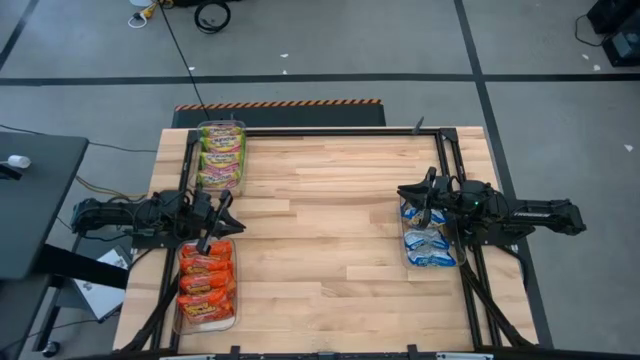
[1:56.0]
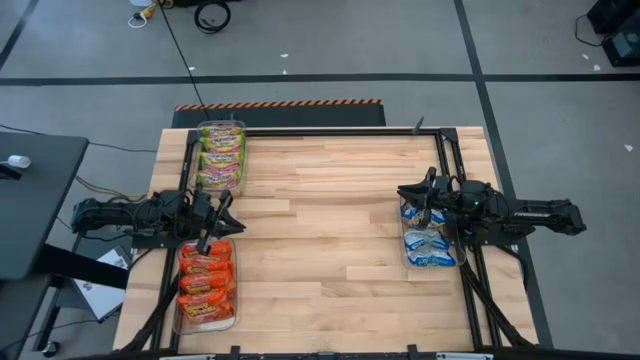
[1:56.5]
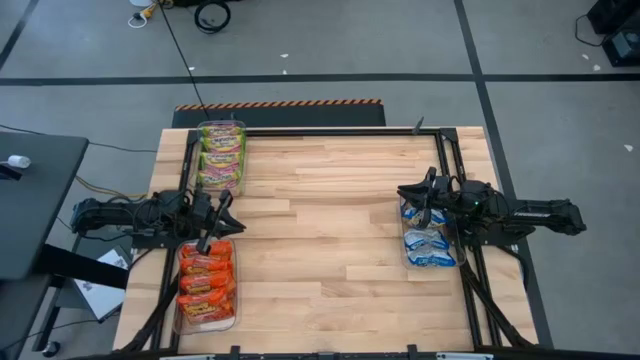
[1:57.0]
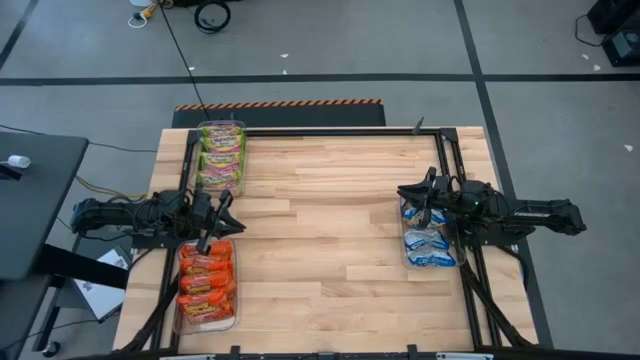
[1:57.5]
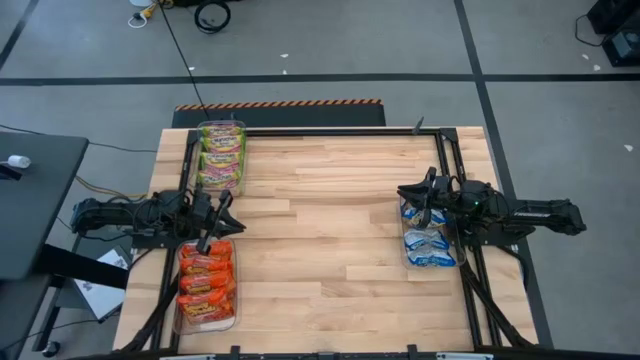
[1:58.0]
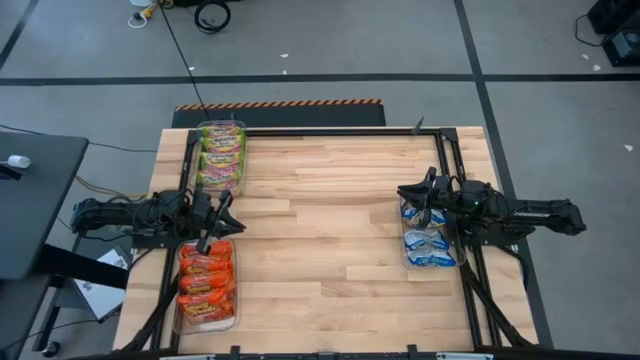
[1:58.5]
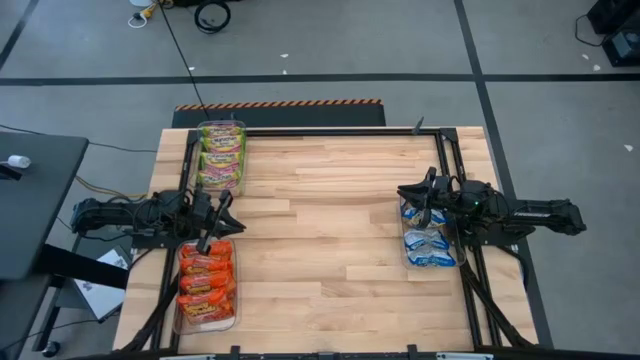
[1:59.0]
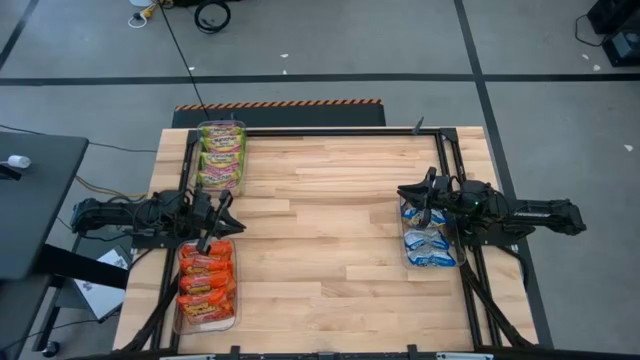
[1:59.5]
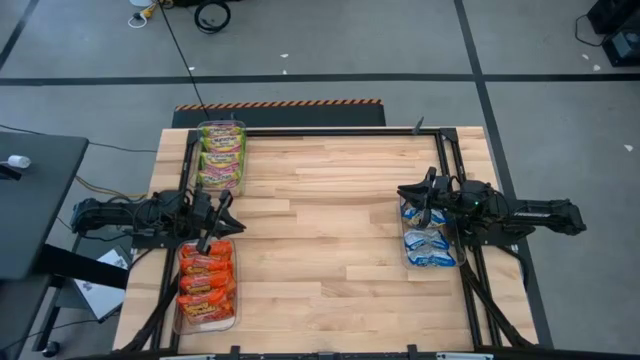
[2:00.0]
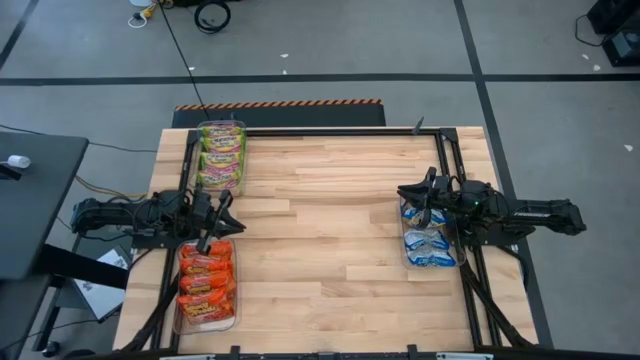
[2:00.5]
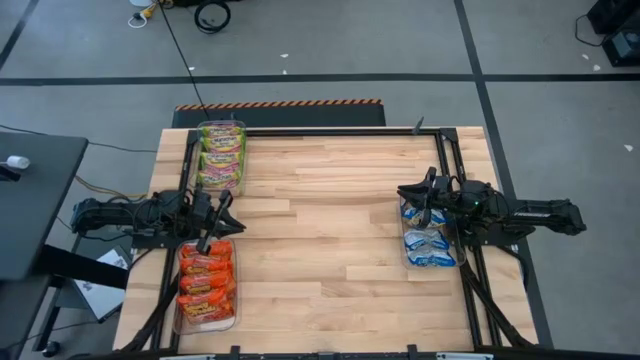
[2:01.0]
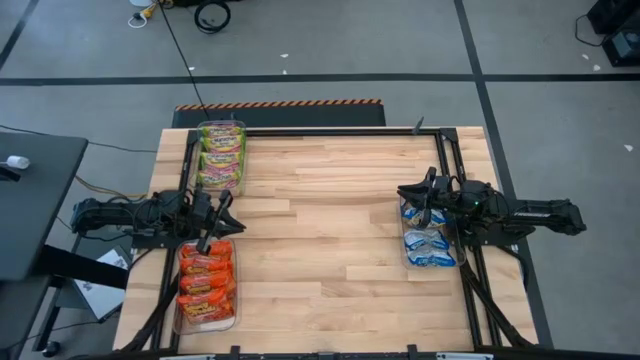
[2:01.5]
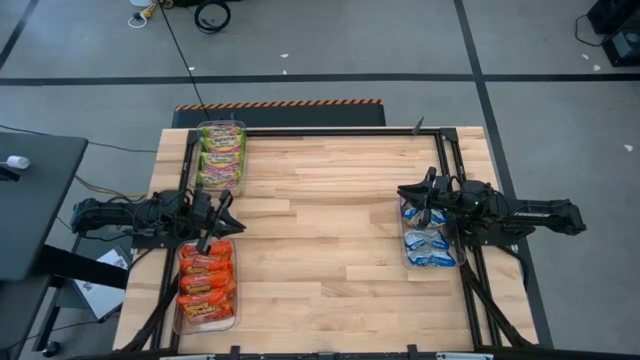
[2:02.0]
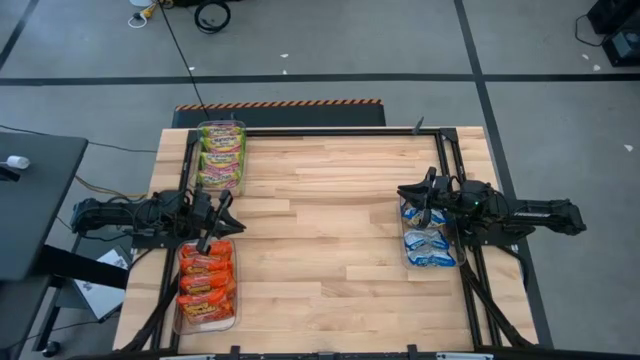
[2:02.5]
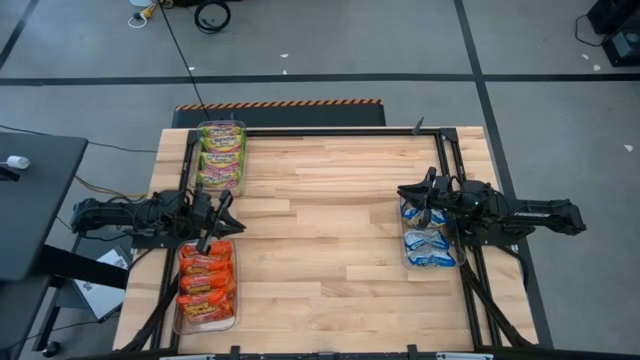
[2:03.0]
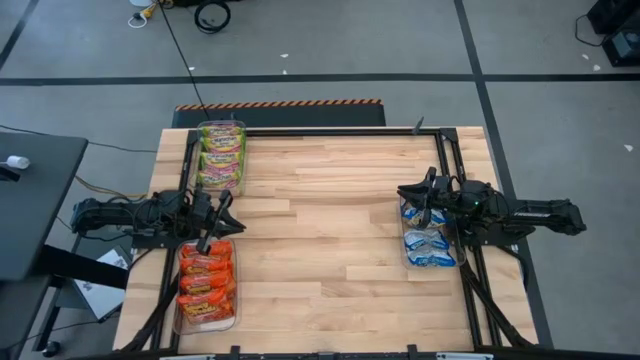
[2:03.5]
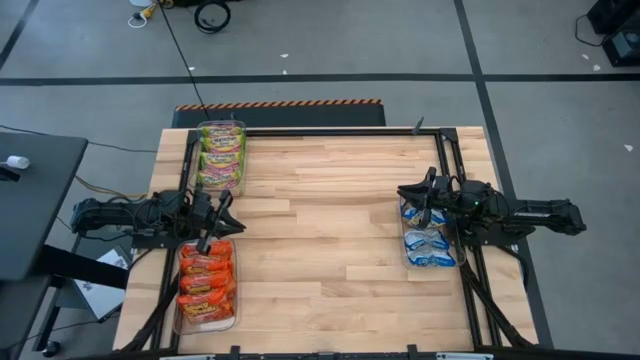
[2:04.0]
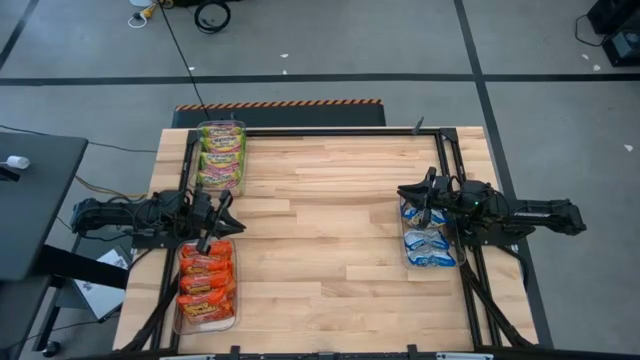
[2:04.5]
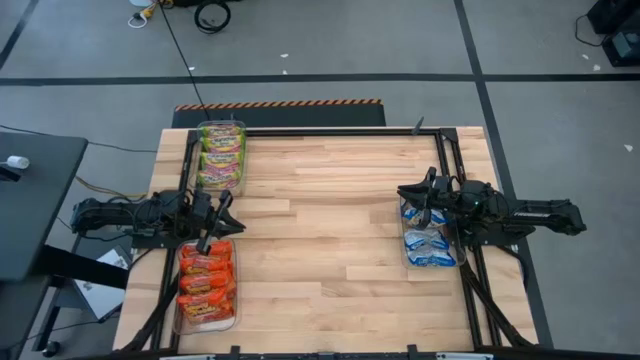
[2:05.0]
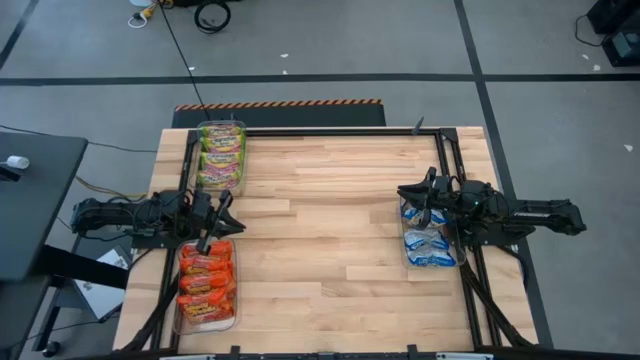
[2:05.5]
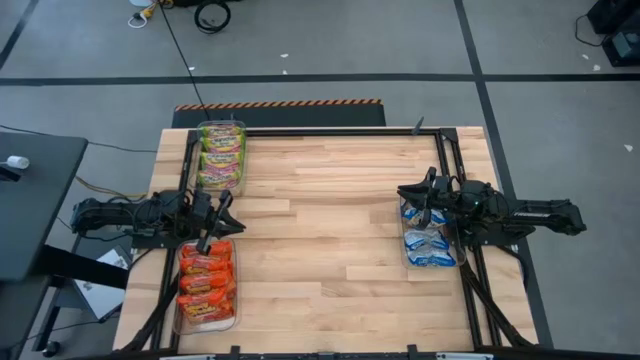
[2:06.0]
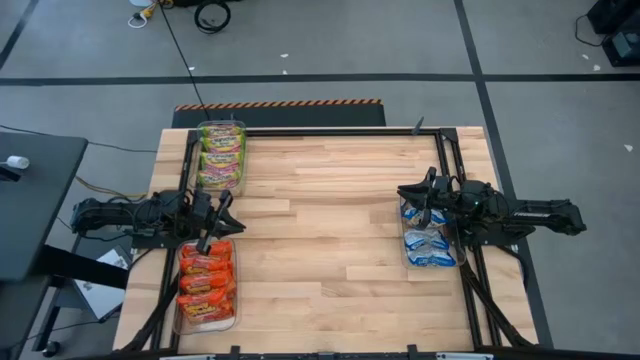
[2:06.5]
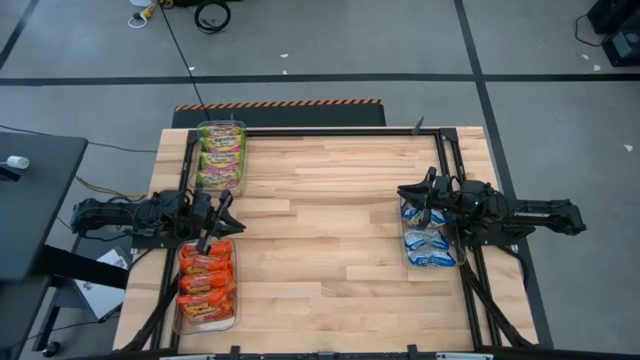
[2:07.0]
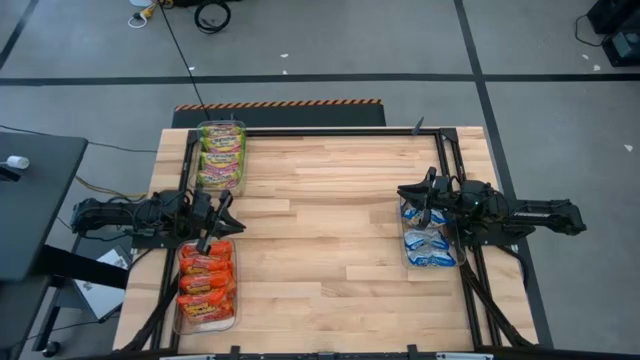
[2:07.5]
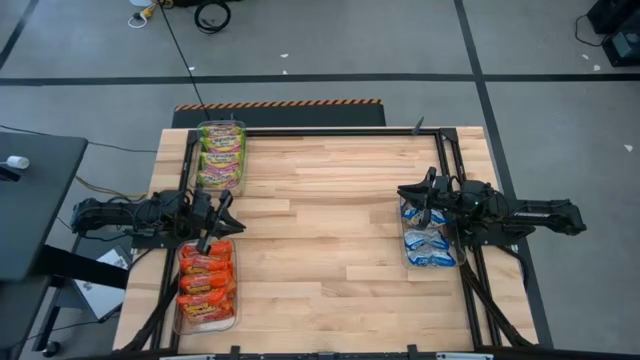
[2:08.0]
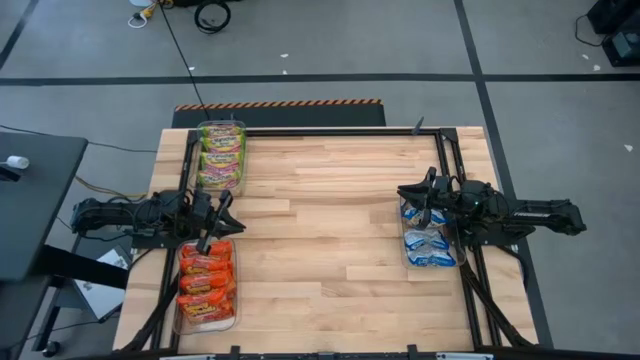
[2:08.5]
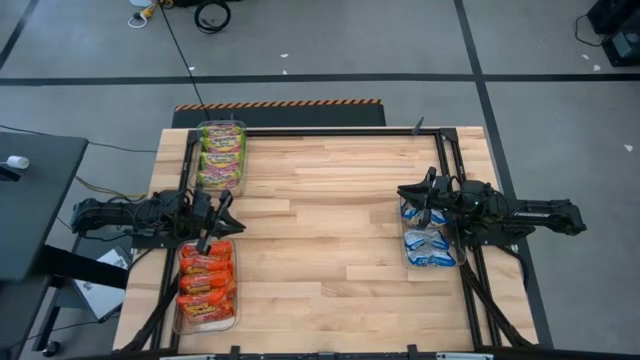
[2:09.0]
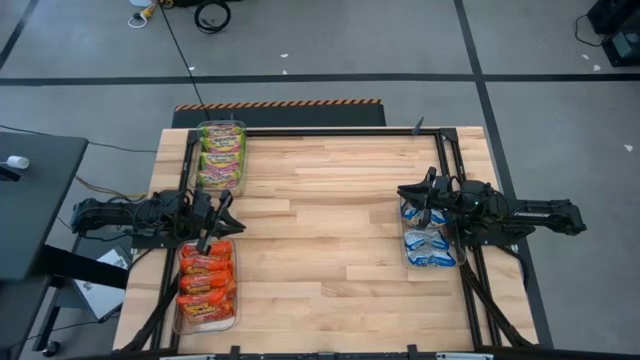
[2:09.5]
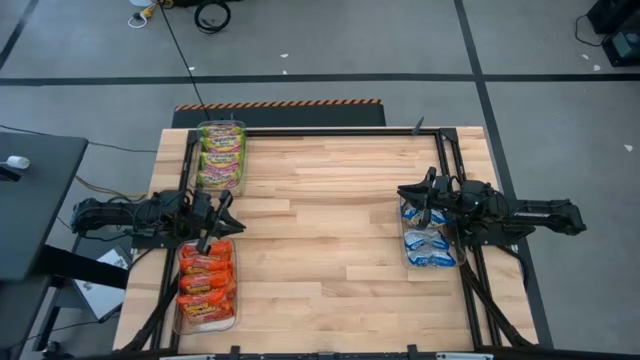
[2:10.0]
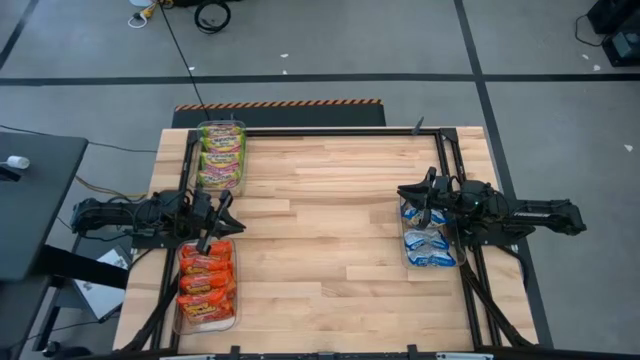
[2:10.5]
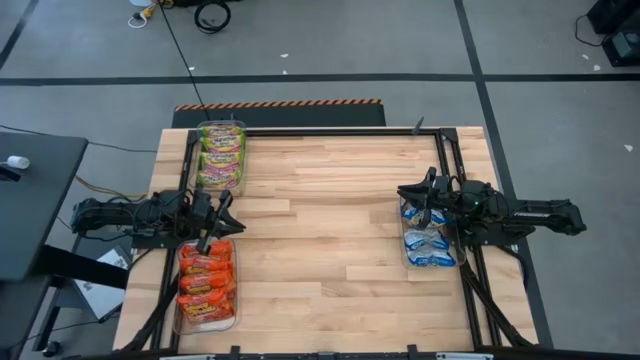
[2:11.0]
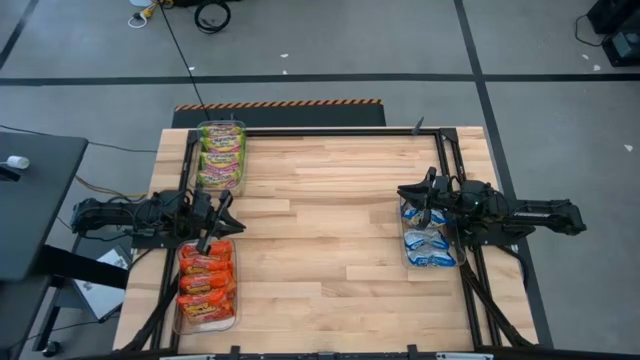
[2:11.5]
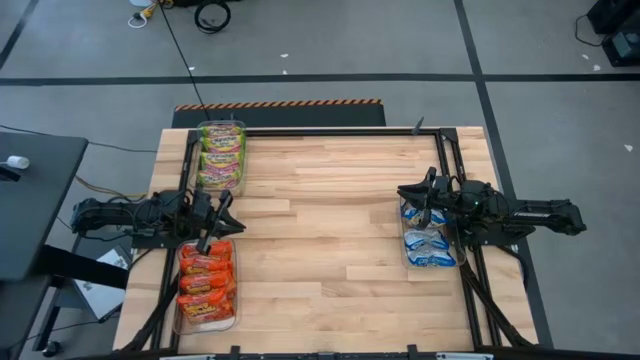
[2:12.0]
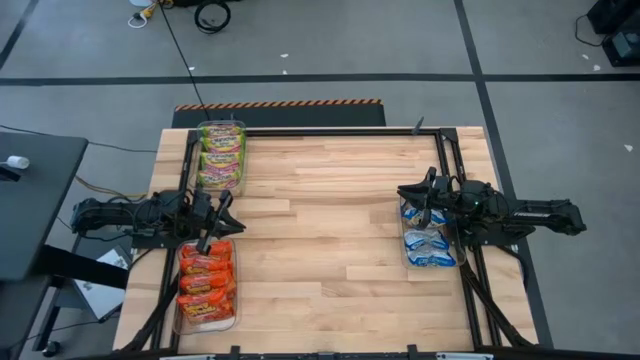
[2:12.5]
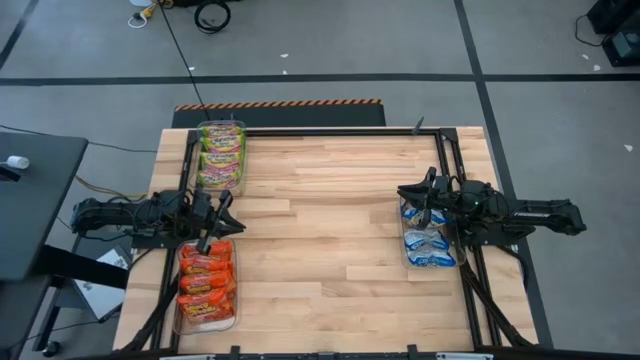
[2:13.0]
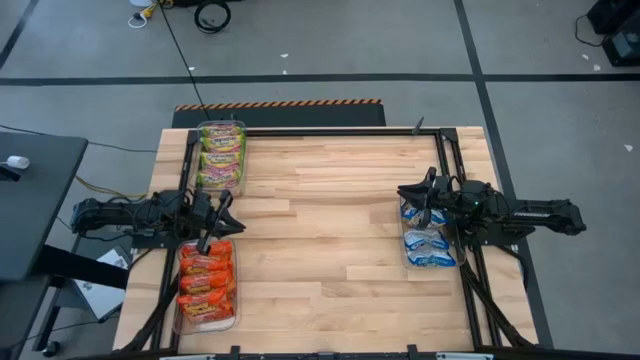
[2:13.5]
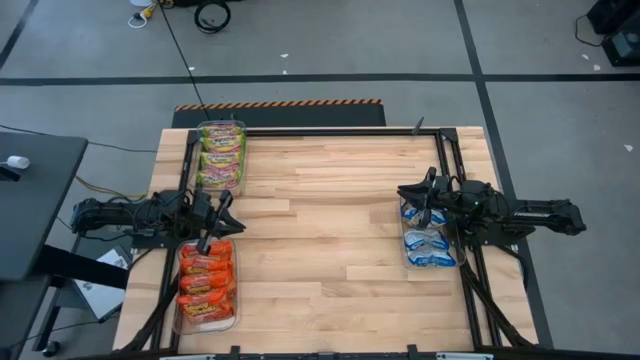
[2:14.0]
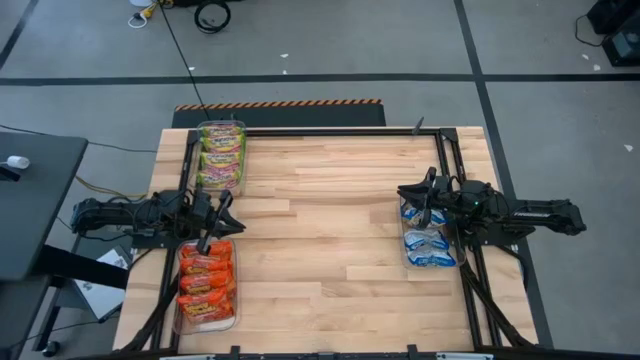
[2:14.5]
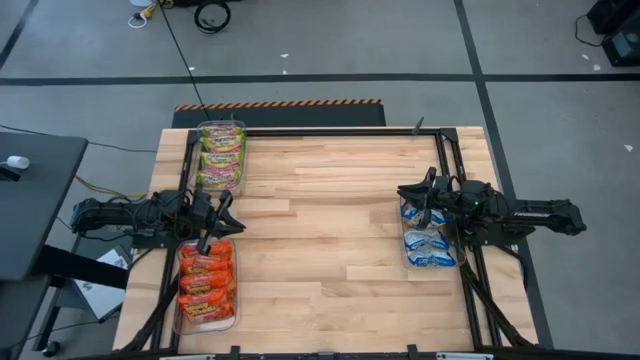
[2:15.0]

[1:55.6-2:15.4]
Task: Sort Maruchan noodles
Return to Home Position
